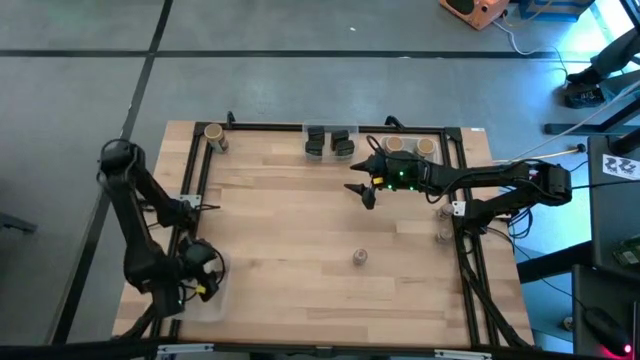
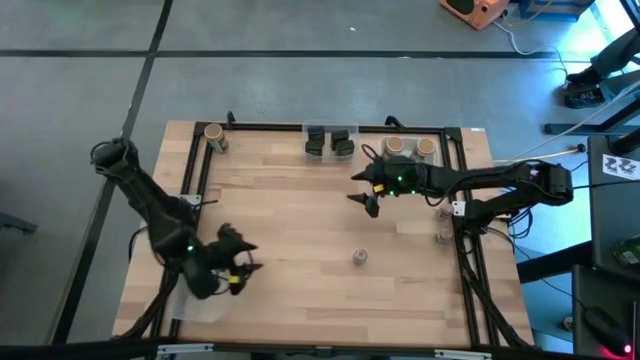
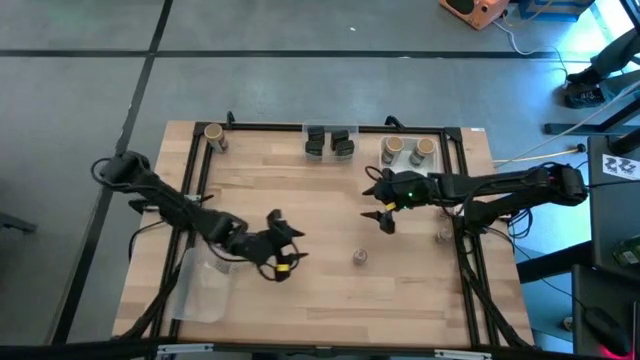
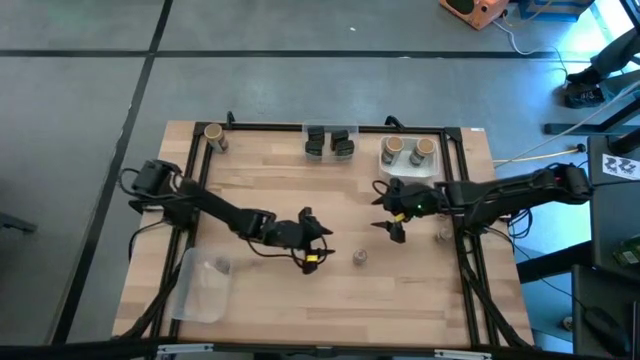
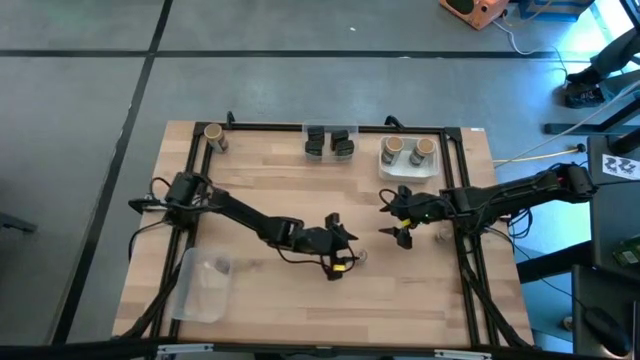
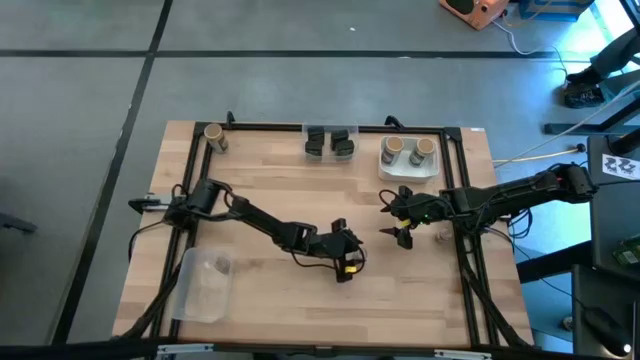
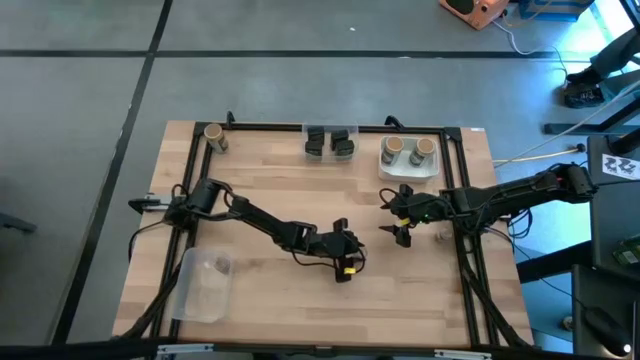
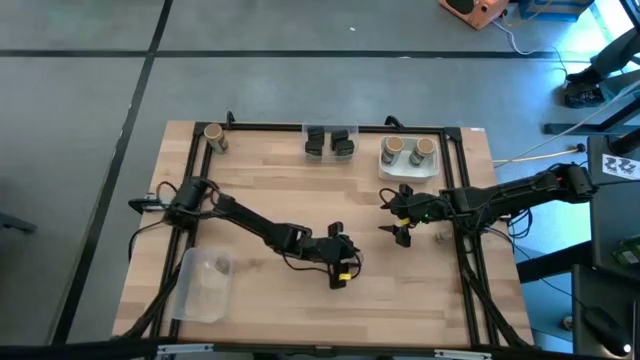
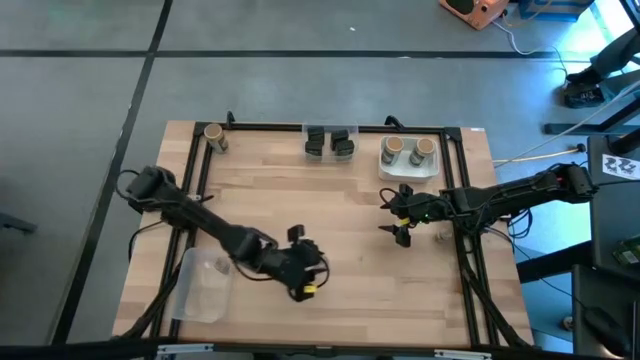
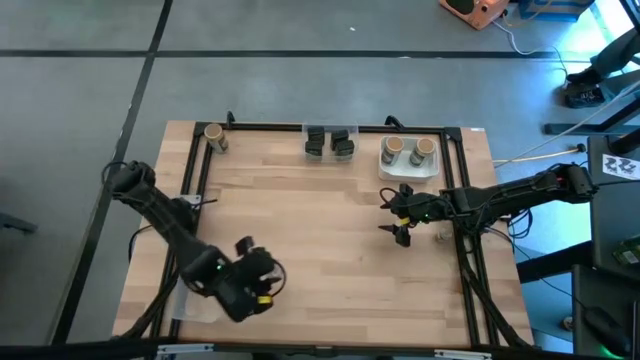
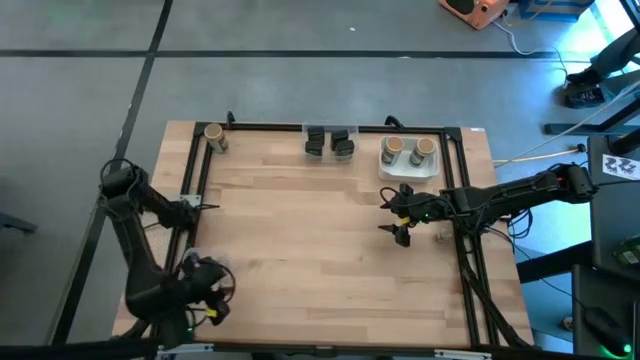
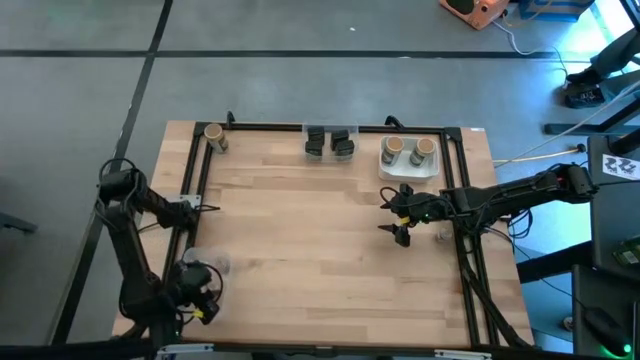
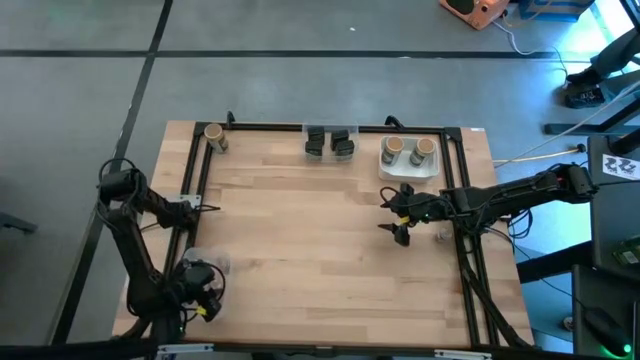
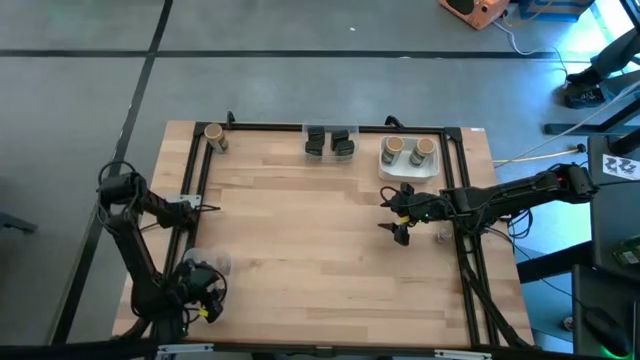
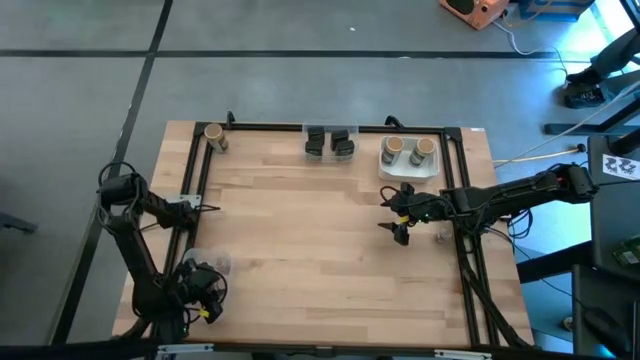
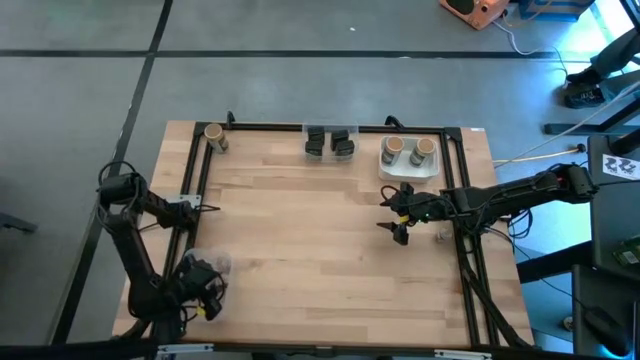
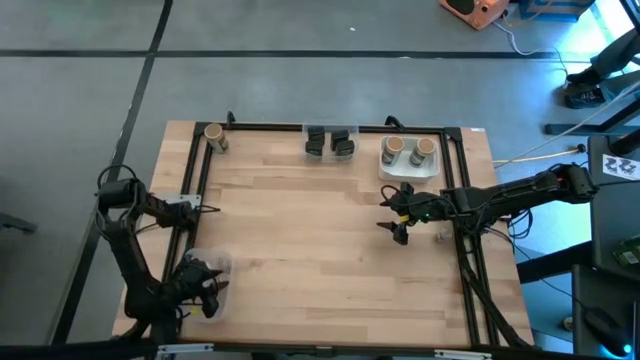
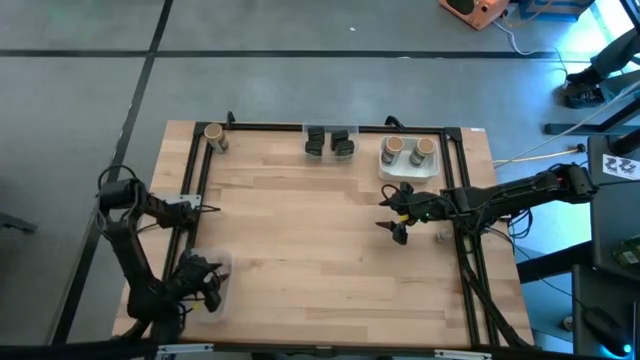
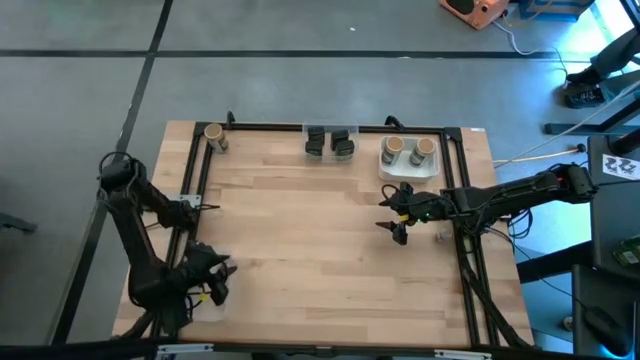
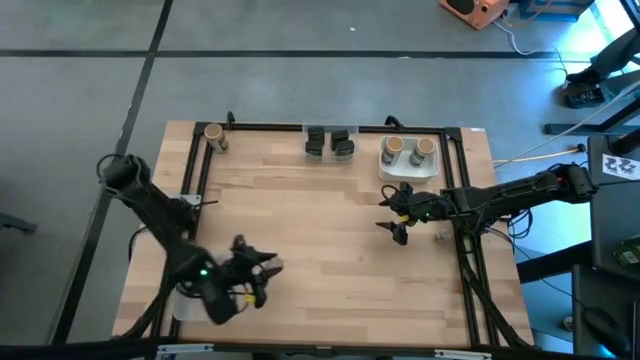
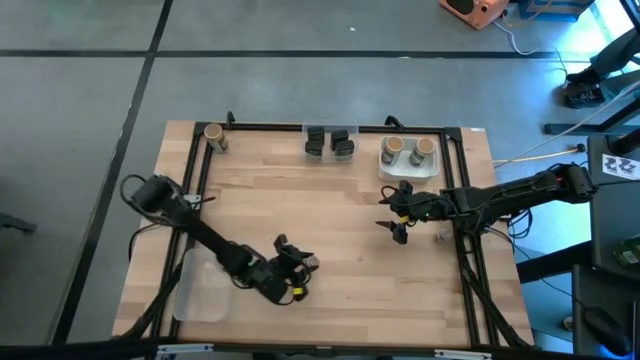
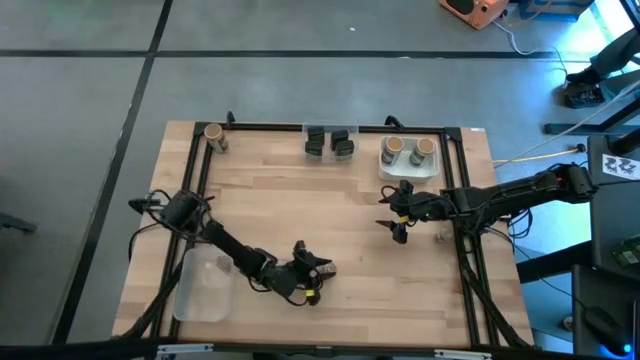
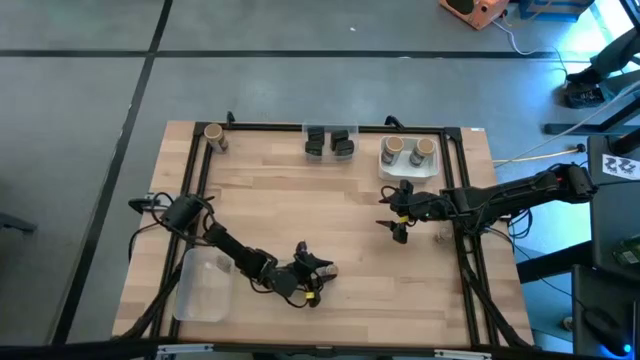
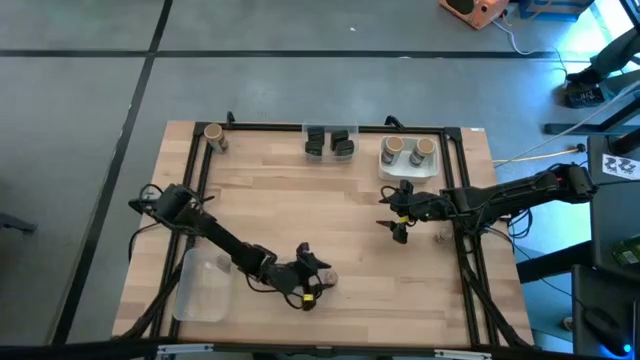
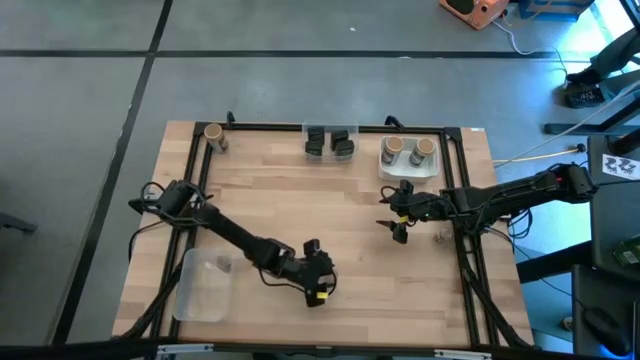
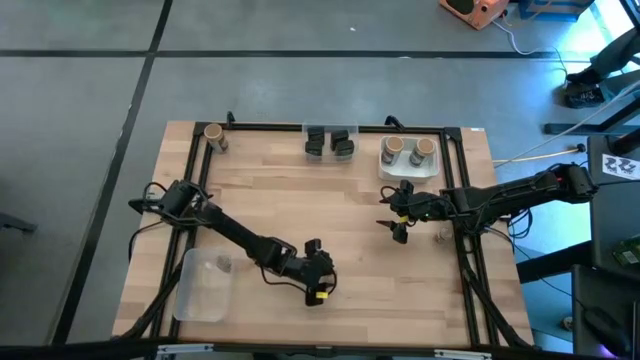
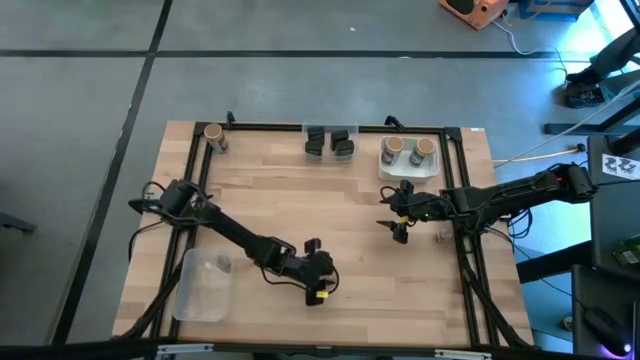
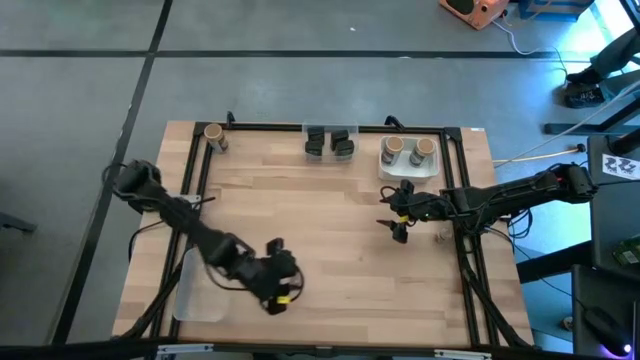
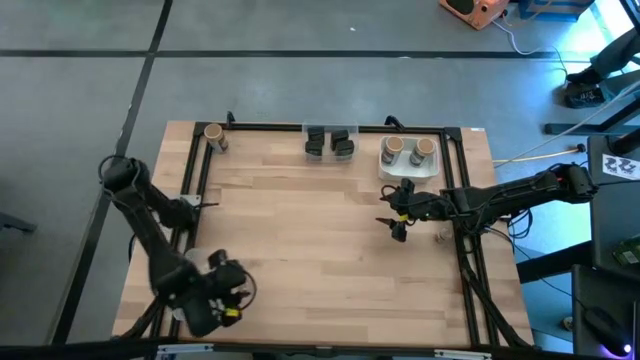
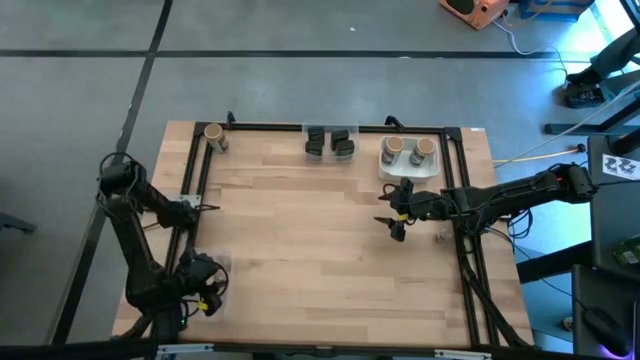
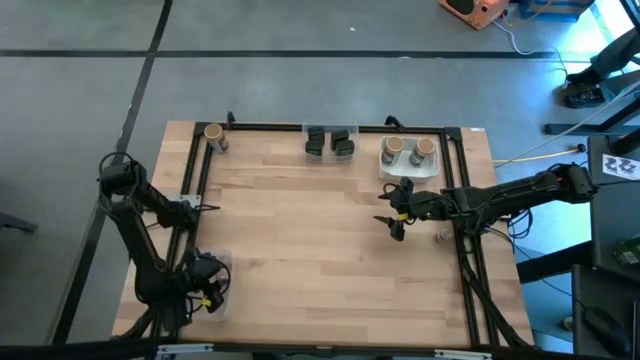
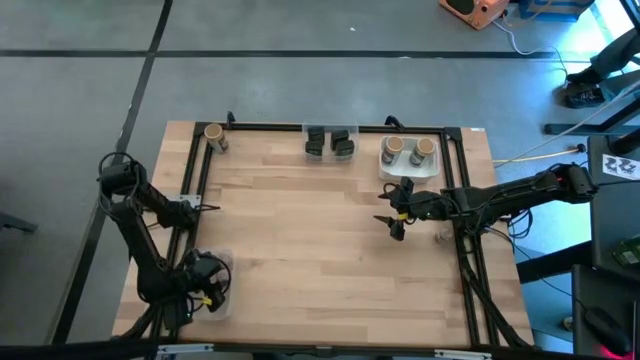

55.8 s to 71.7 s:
Task: Sort spices by type
Put the left transparent seasoning bottle into the left transparent bin
